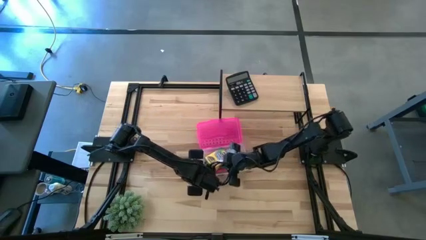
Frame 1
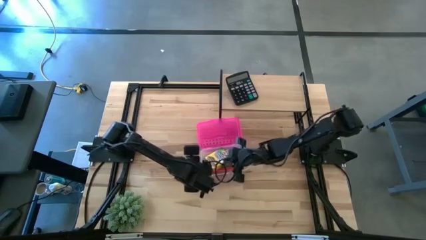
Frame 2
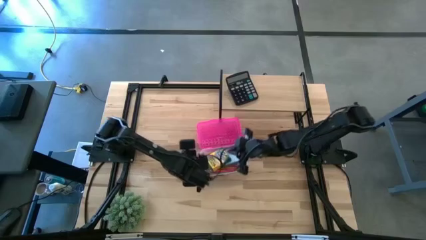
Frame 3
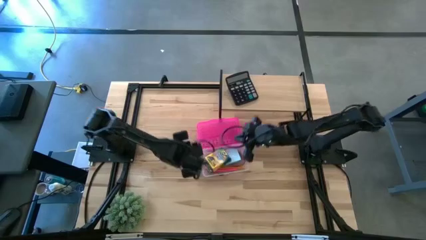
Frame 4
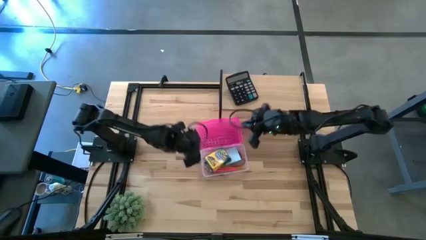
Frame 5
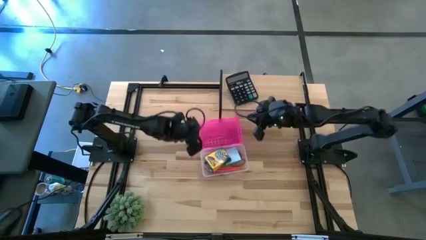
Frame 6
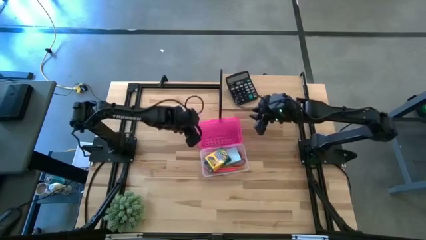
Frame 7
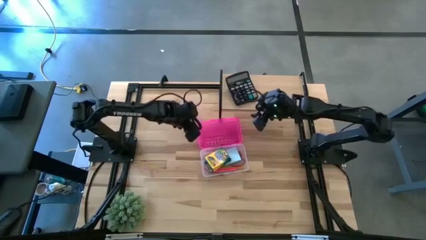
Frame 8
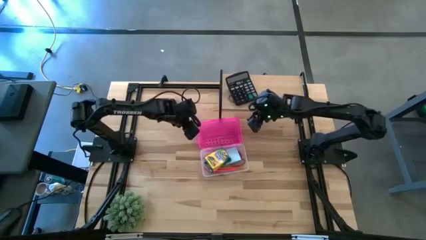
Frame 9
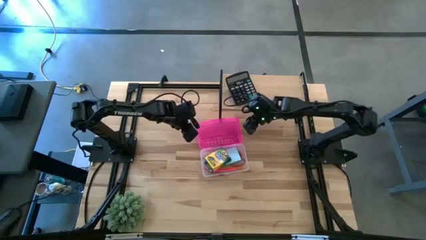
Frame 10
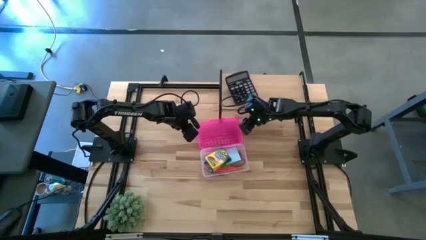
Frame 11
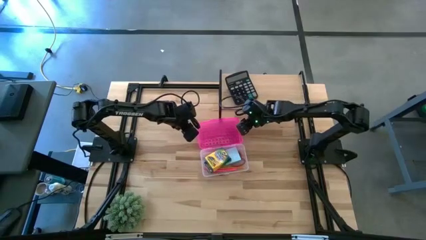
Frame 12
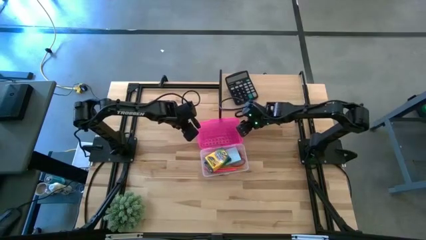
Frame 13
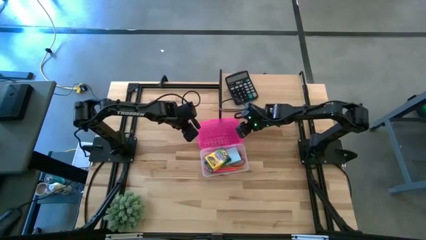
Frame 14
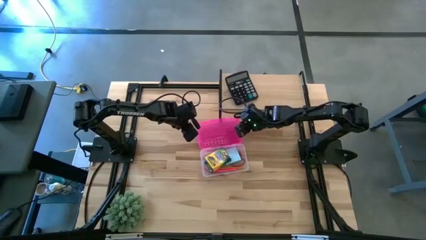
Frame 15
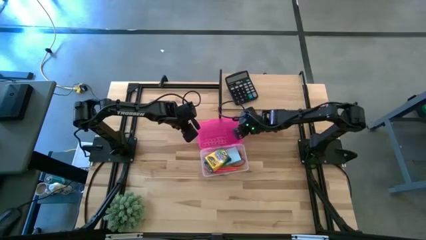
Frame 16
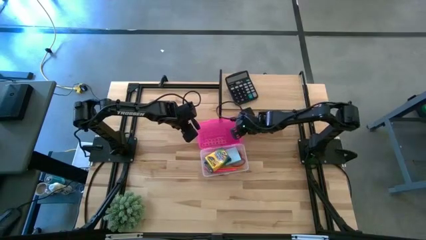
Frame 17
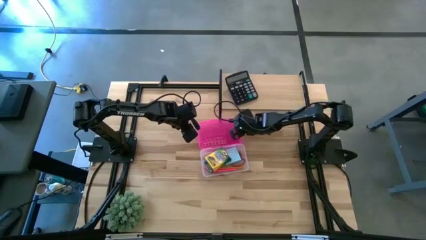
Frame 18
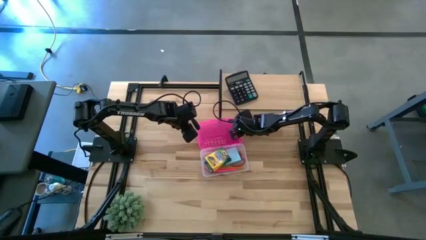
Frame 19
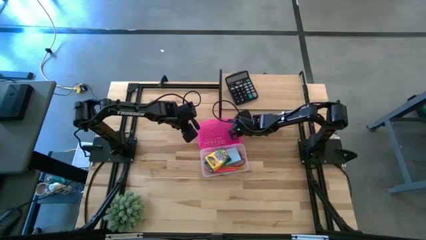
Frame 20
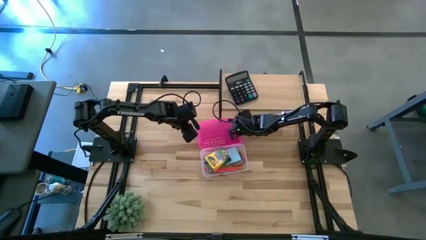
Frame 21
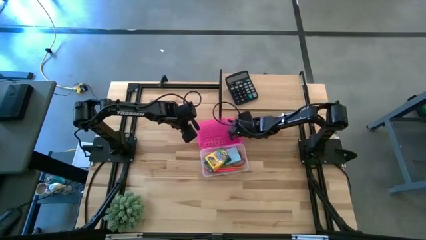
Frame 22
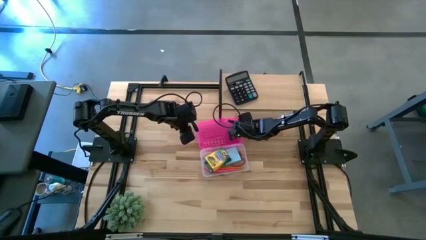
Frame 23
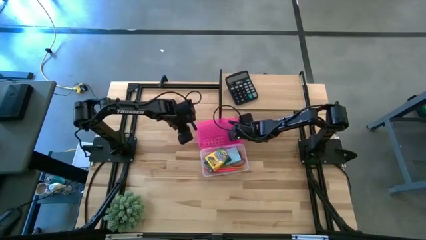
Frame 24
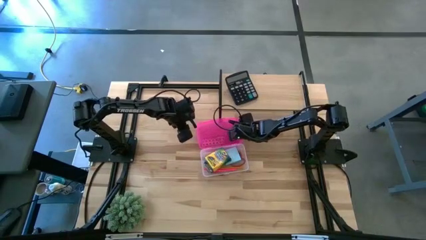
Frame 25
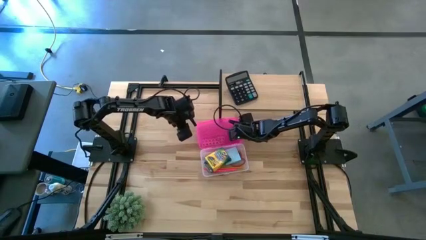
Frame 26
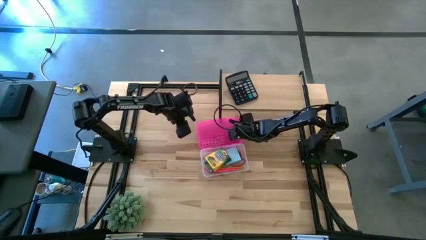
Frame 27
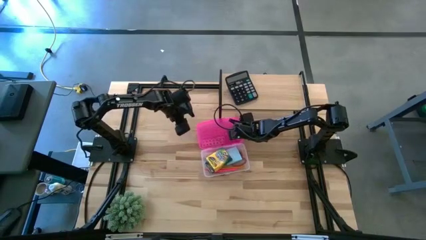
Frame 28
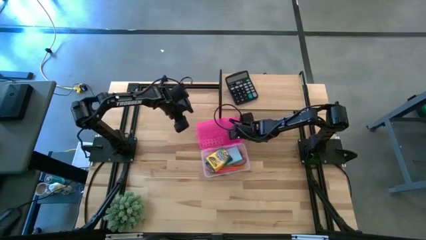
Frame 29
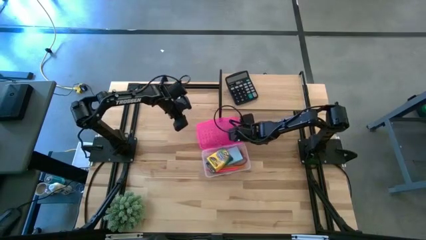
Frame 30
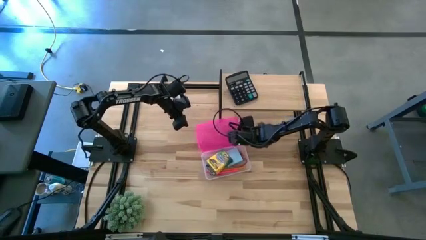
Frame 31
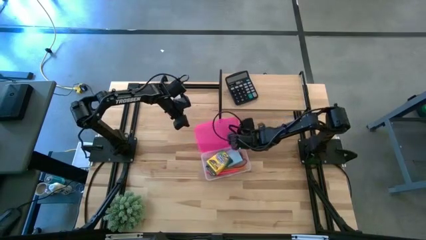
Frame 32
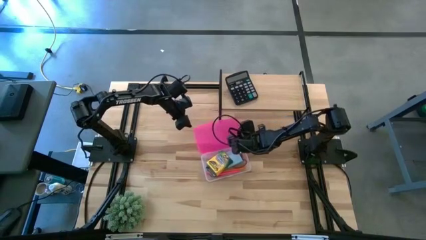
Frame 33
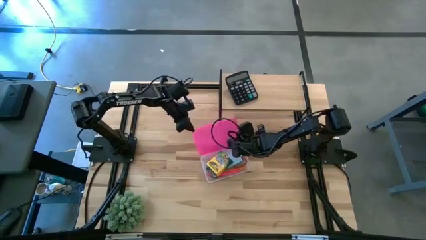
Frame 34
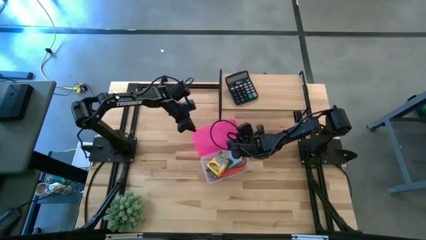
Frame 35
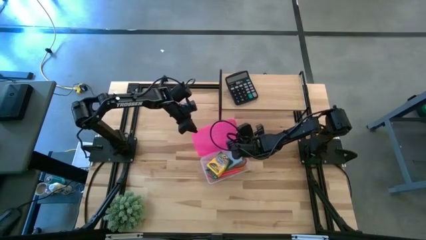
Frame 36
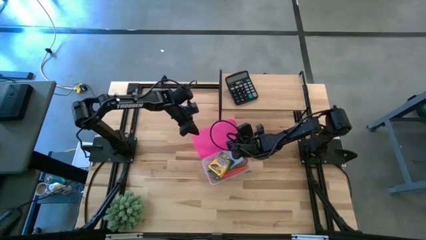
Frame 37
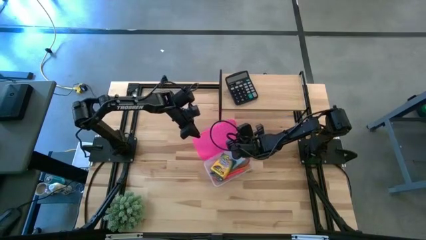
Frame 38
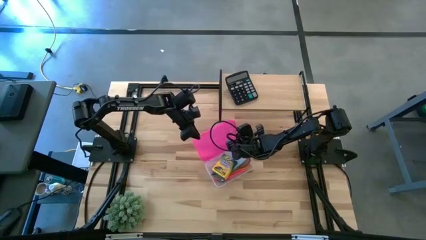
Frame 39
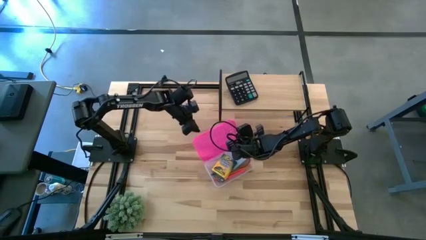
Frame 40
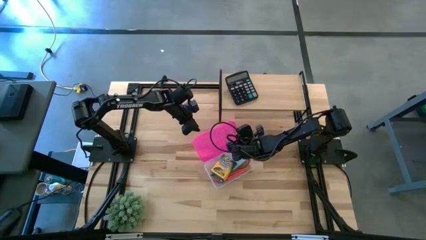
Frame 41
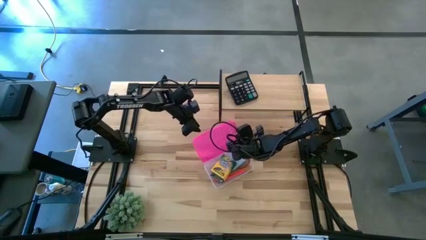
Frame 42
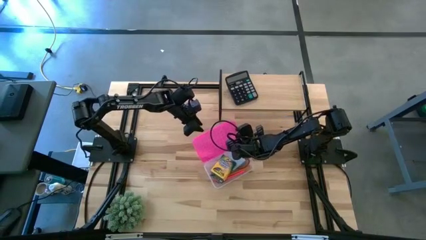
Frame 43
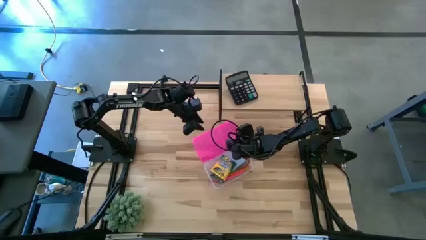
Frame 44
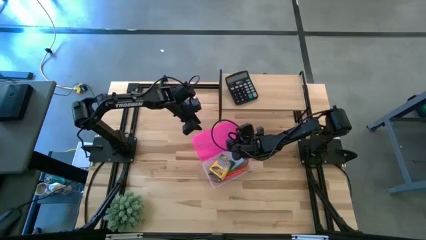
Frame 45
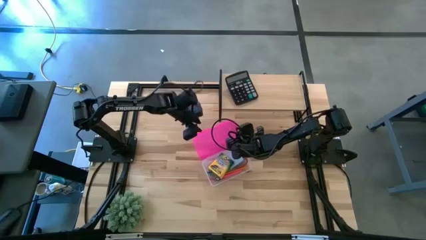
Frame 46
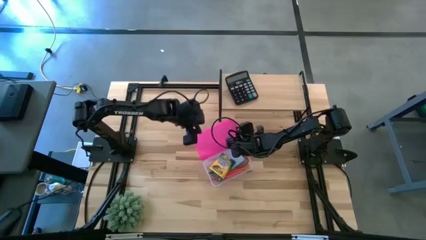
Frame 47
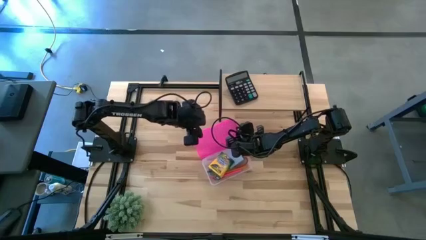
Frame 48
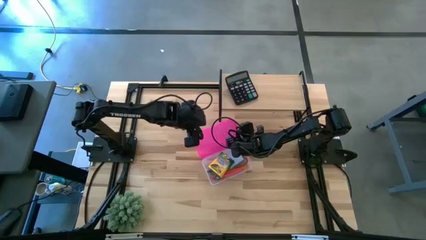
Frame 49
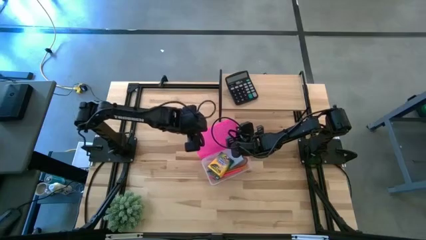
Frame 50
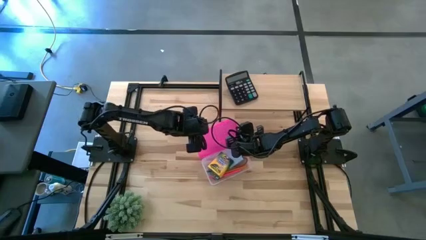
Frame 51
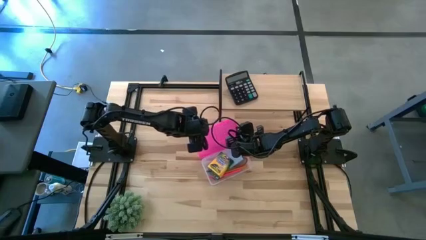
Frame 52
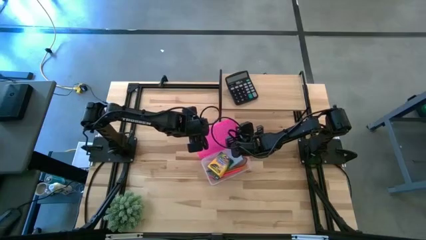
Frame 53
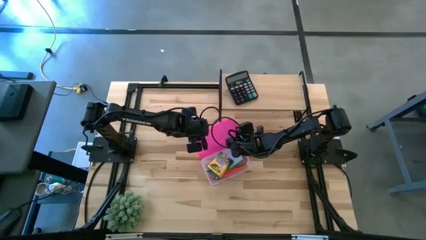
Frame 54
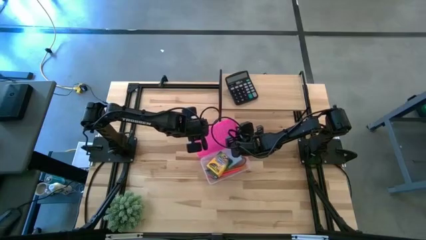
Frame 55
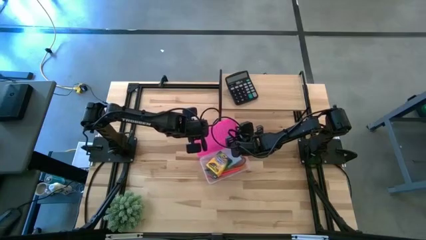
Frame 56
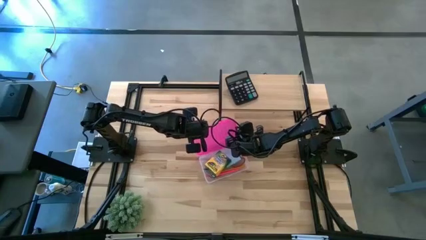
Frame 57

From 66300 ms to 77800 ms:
Task: Pack school essentials
Close the supply box

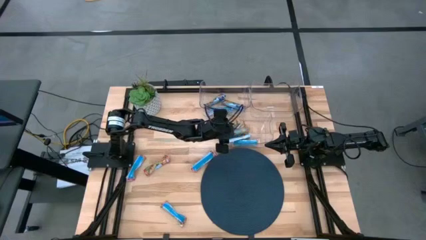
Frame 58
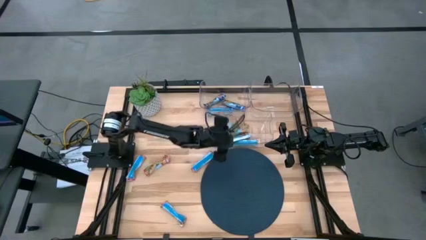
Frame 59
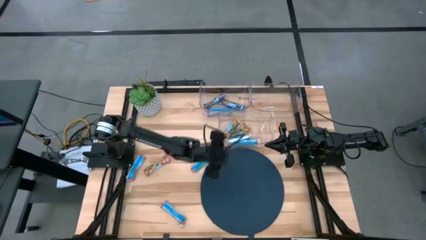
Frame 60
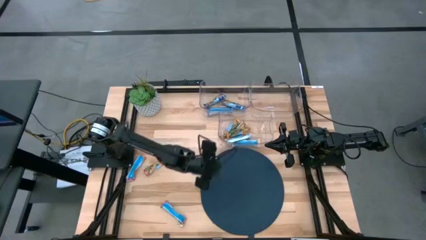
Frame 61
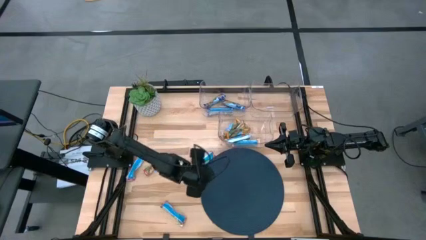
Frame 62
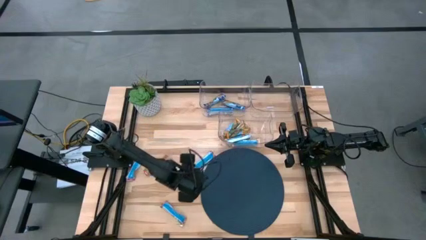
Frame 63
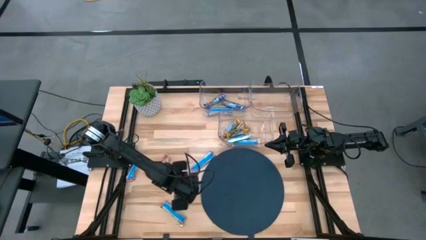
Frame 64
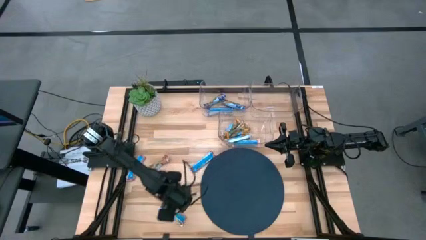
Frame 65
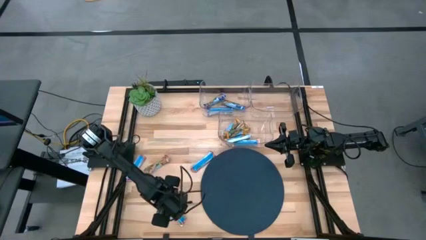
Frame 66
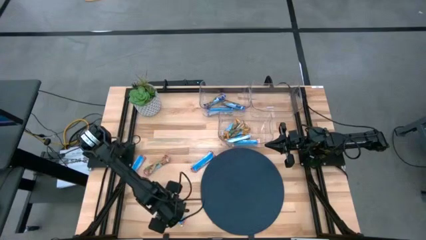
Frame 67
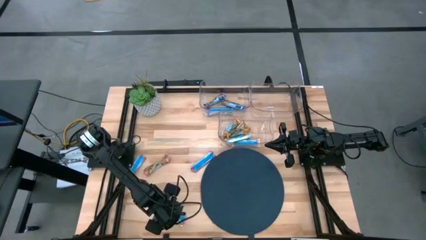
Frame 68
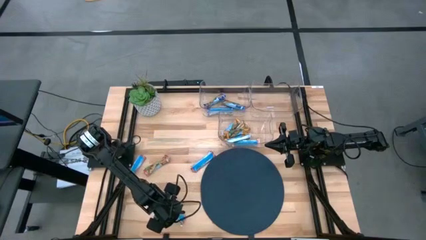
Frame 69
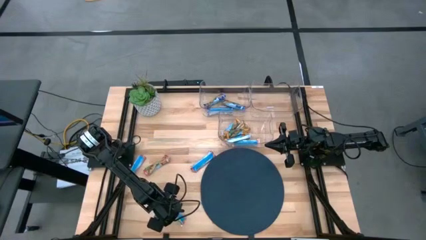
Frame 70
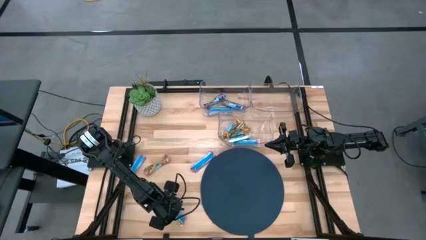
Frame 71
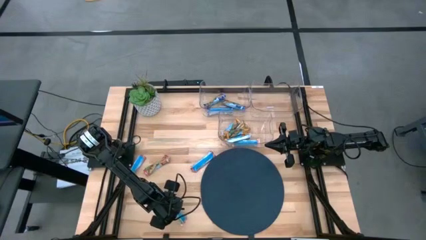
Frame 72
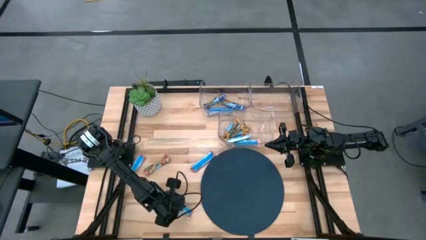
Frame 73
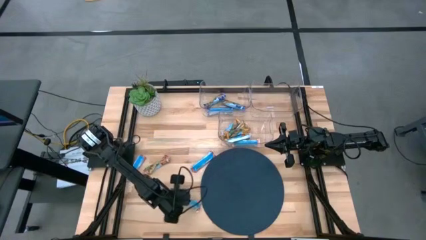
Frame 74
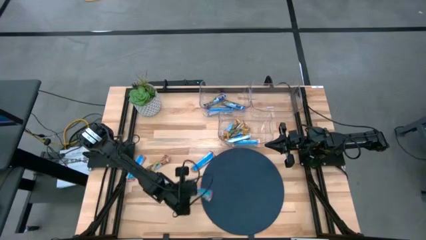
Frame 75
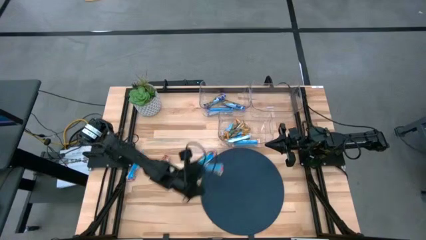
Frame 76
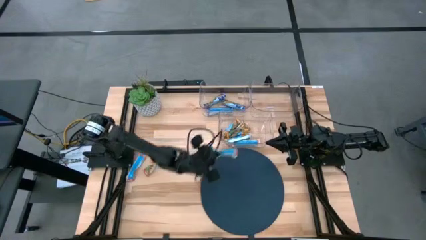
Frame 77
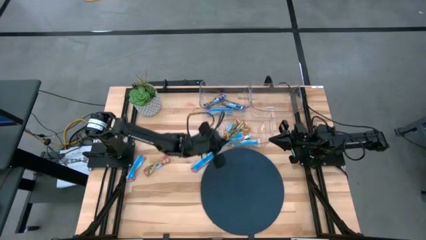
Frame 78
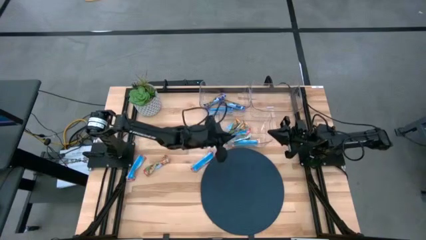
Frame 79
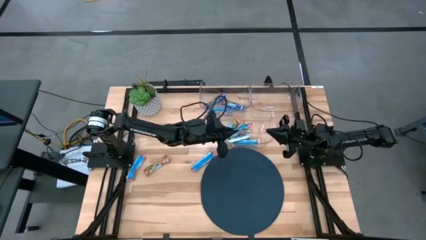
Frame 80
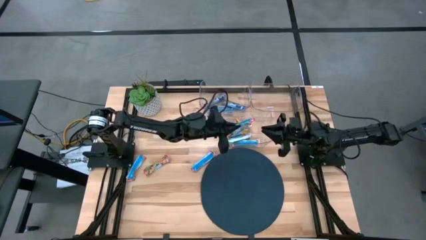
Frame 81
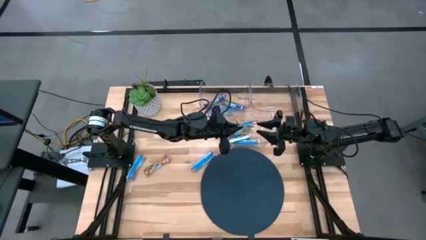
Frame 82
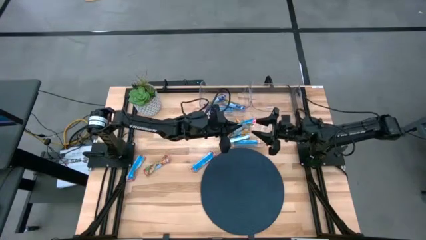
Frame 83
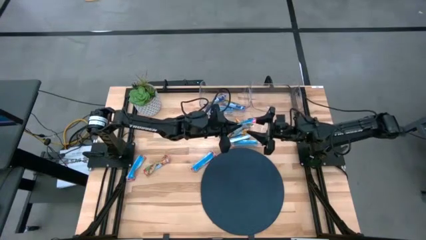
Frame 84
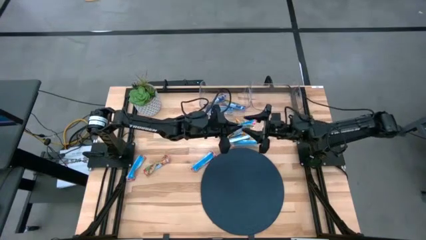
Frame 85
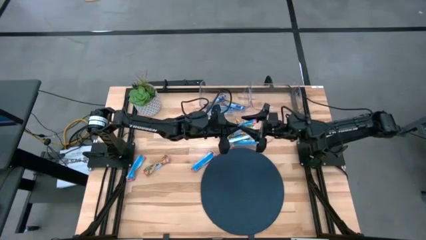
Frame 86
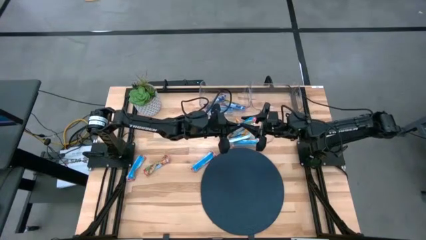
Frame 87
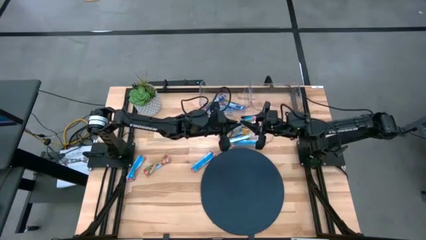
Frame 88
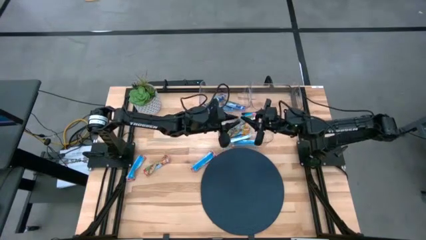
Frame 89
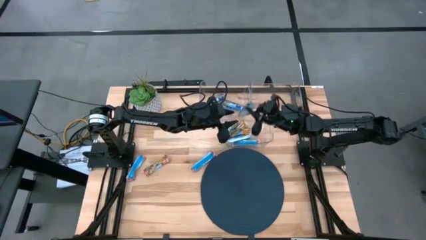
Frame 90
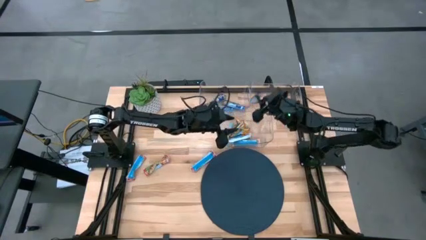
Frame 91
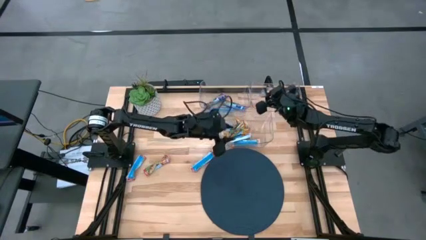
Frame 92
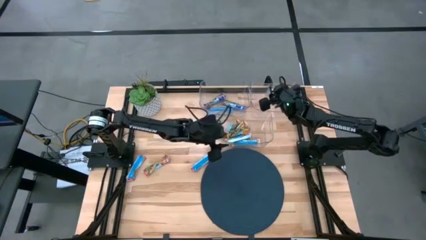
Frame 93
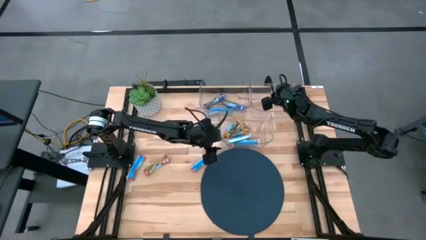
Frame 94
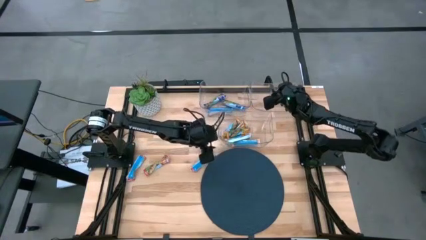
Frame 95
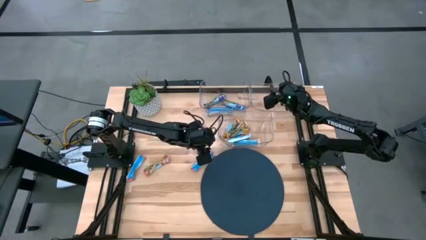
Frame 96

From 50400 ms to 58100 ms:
Task: Pick and place Granola Bars by type
Put the red granola bar into the top right transparent bin
